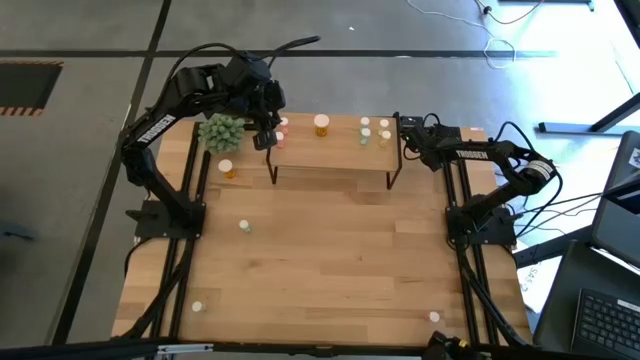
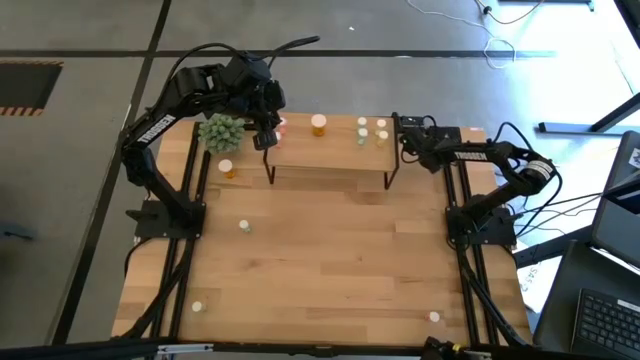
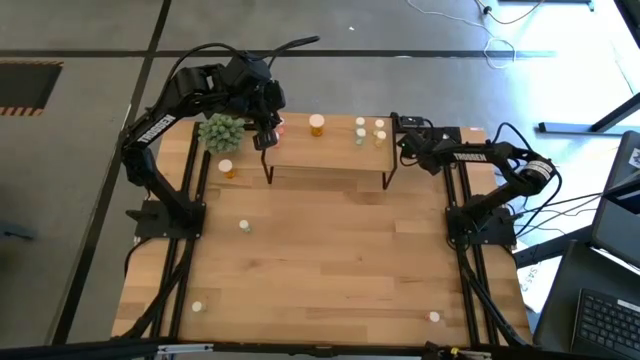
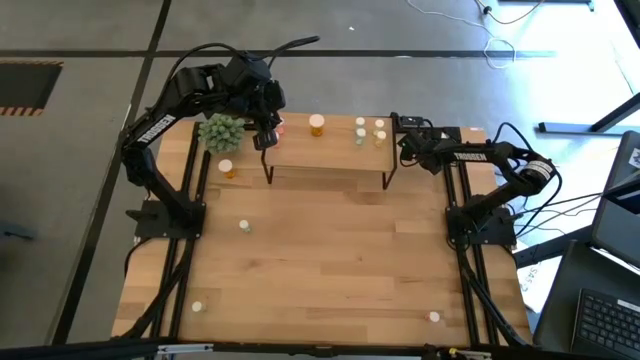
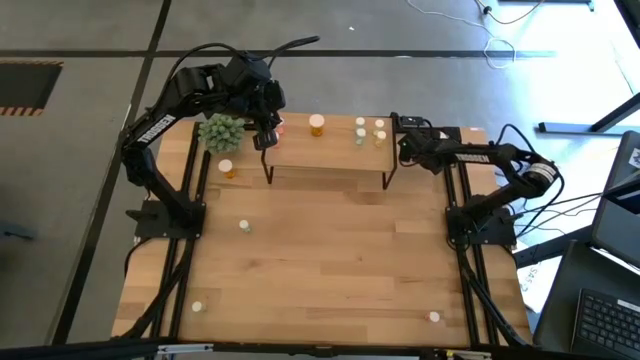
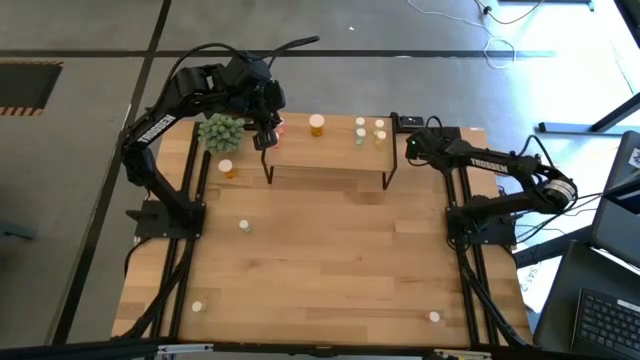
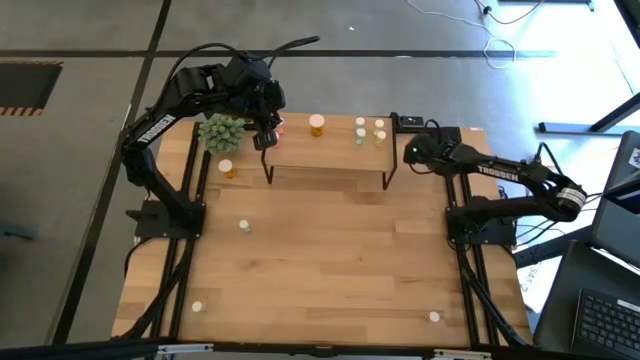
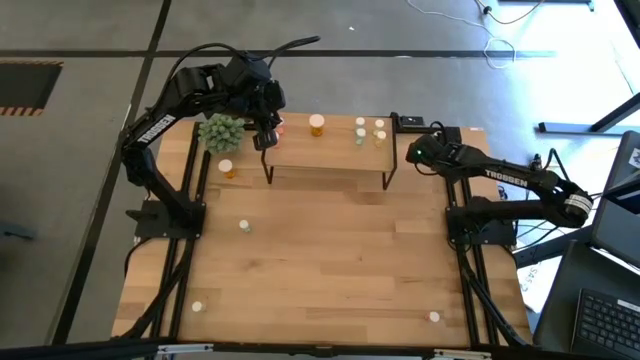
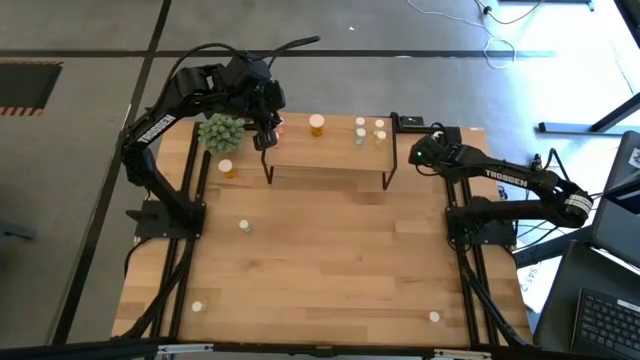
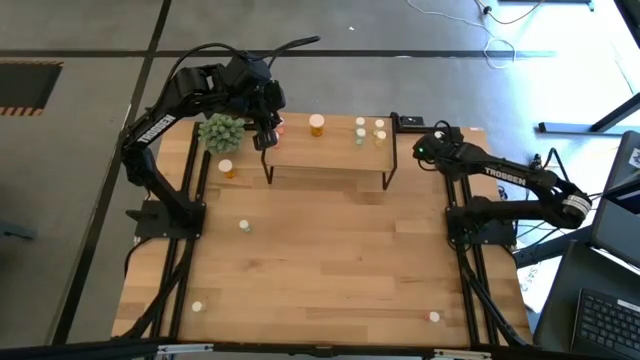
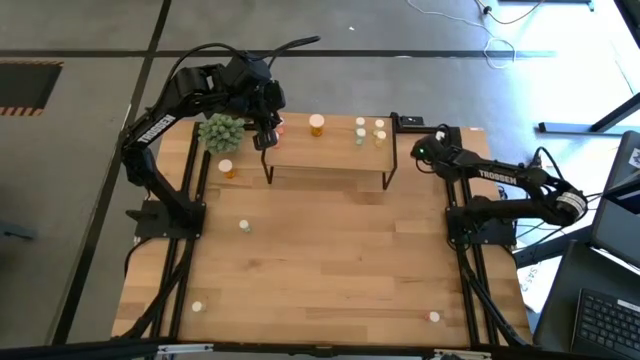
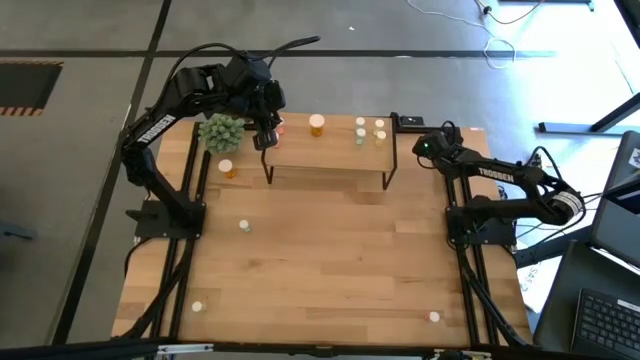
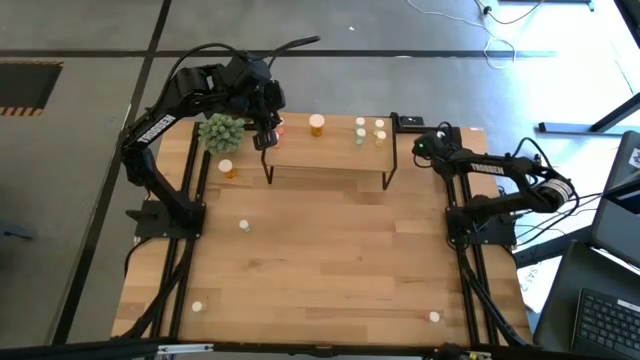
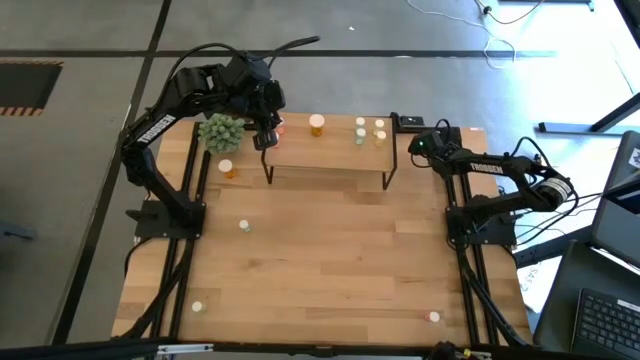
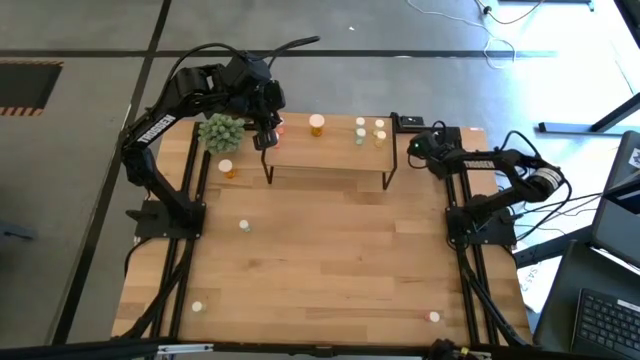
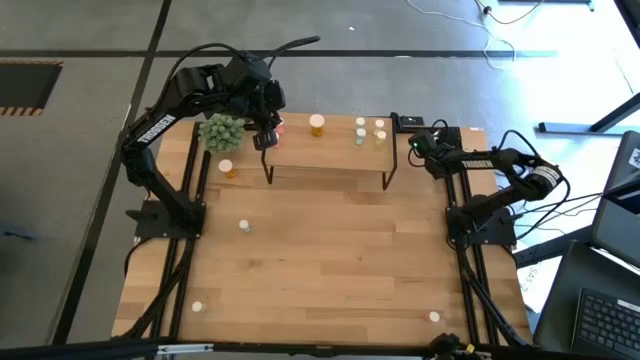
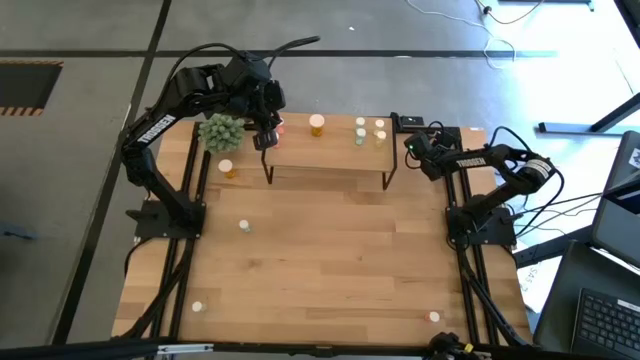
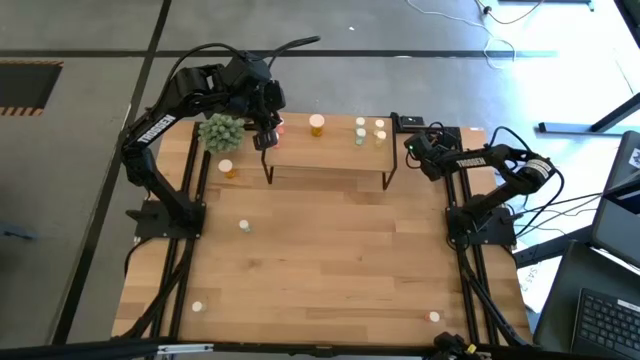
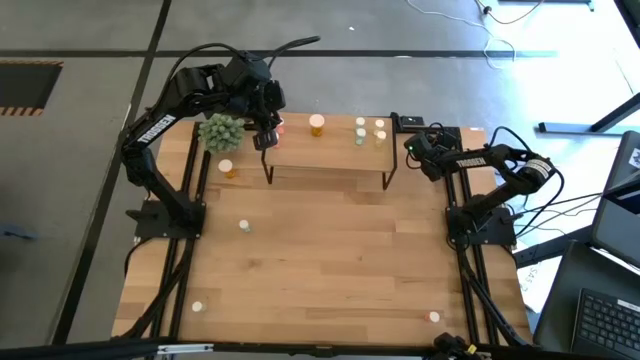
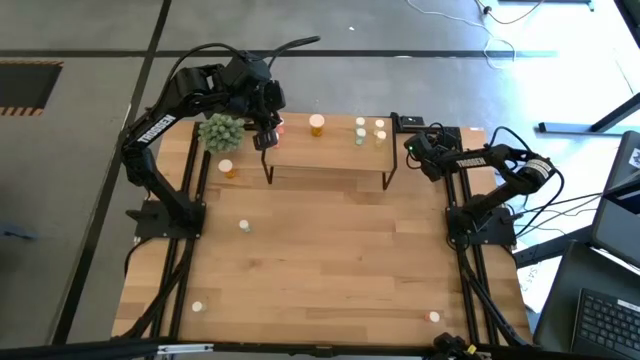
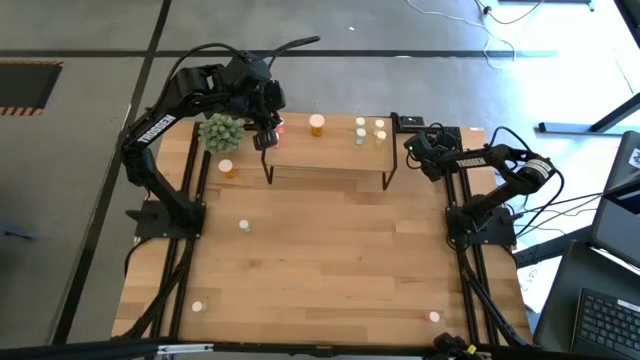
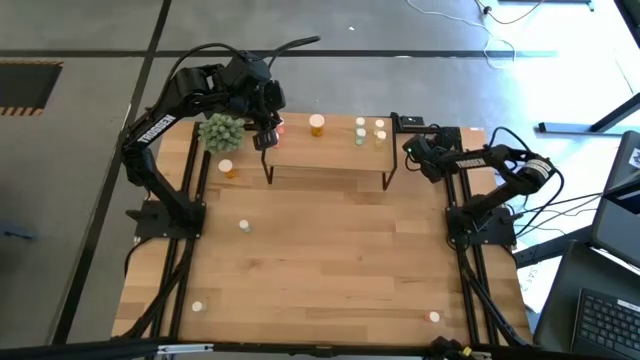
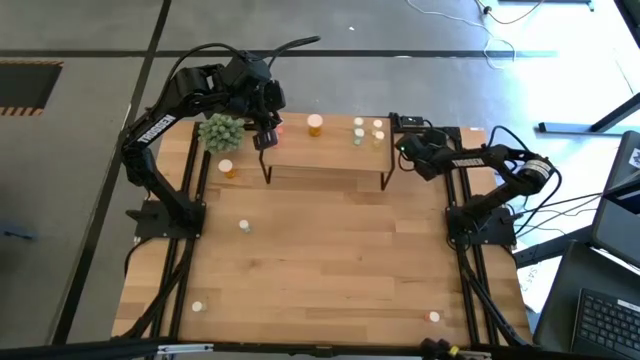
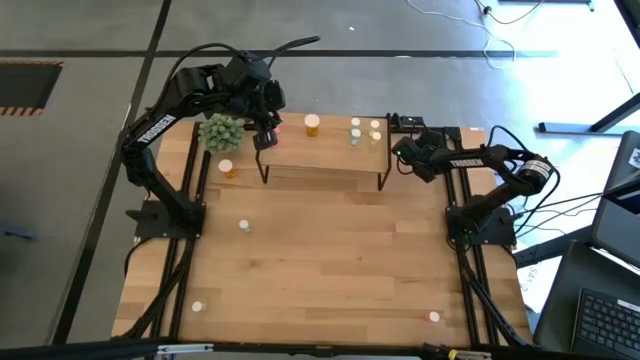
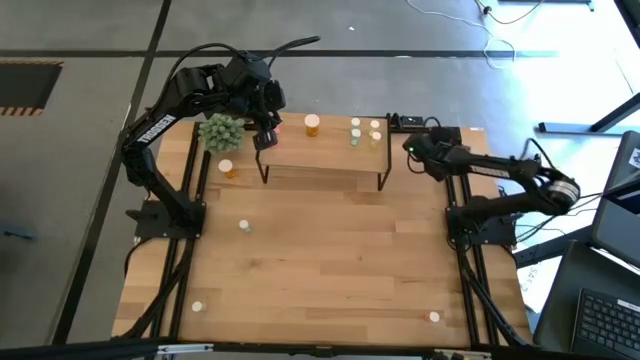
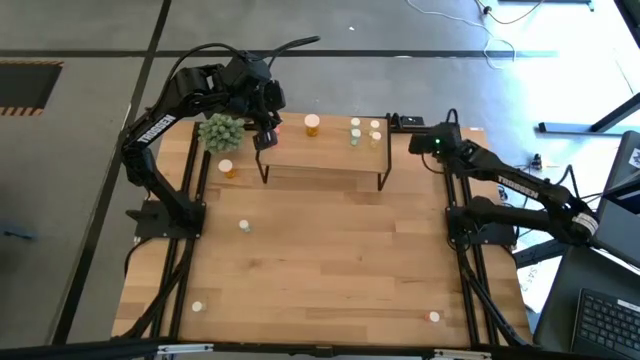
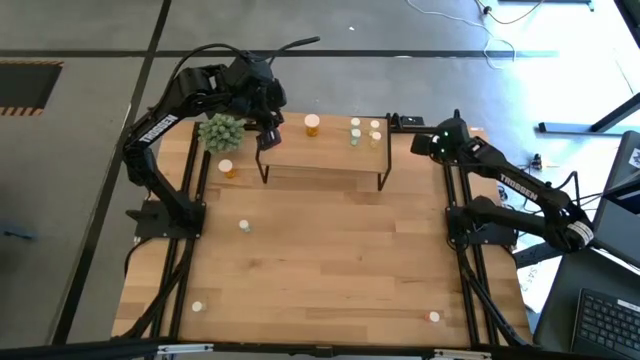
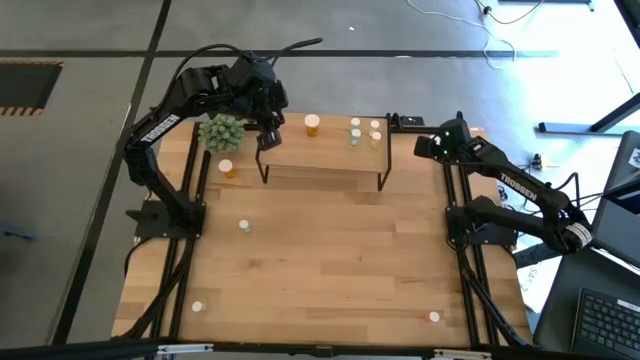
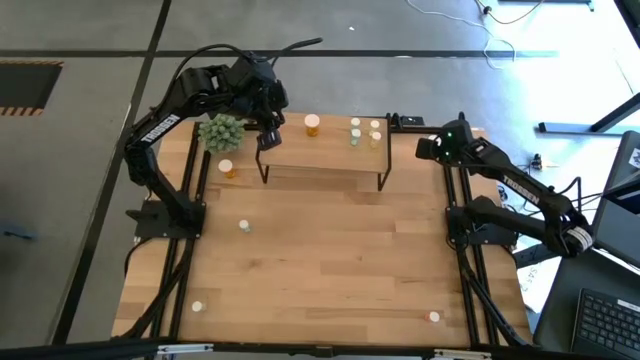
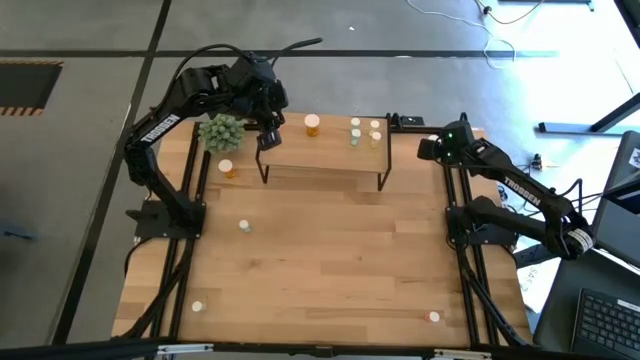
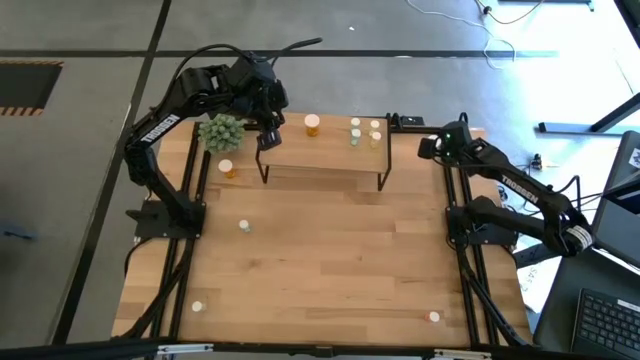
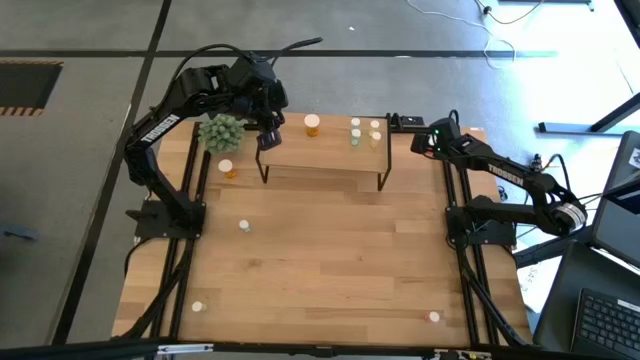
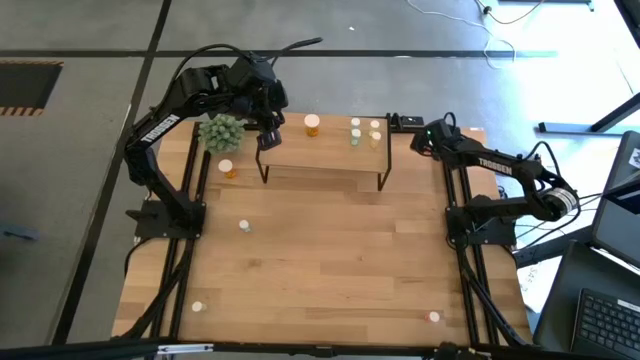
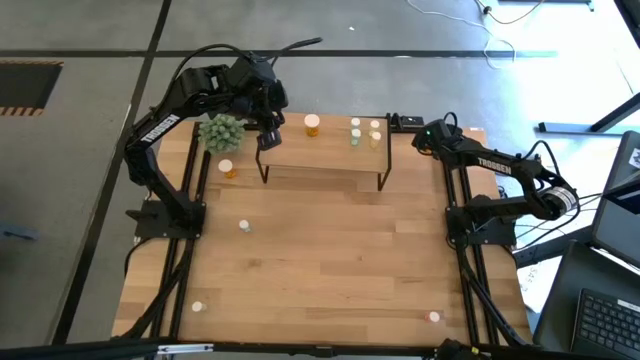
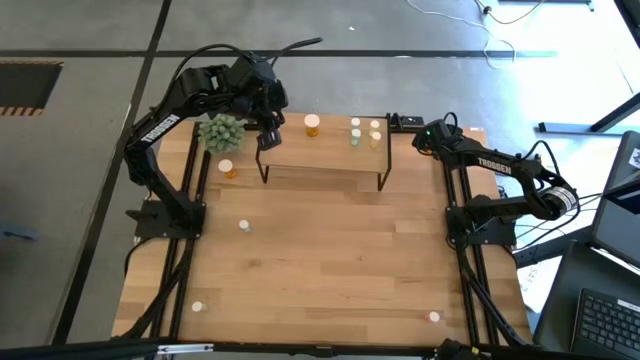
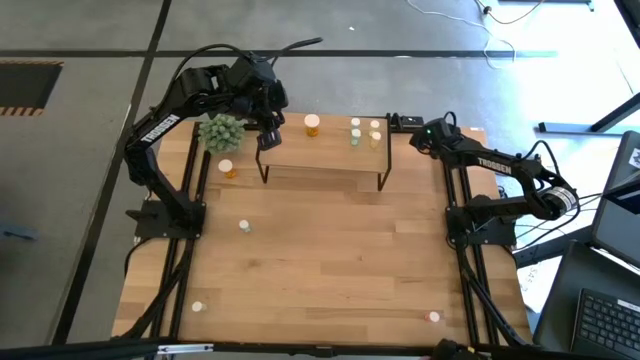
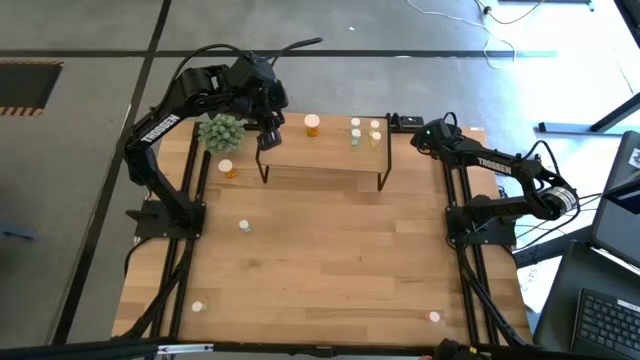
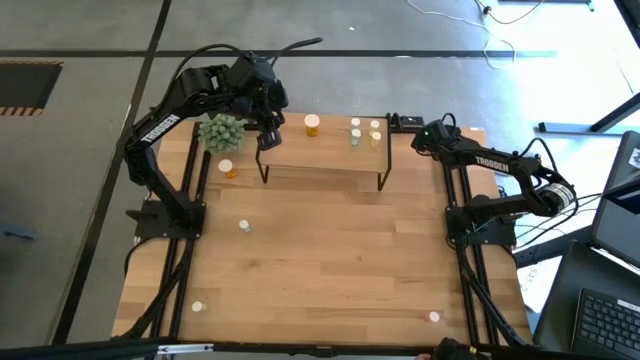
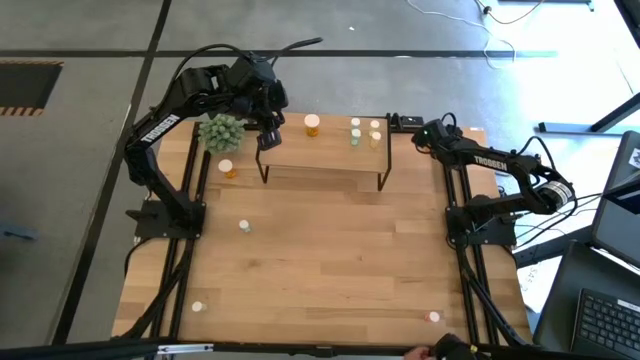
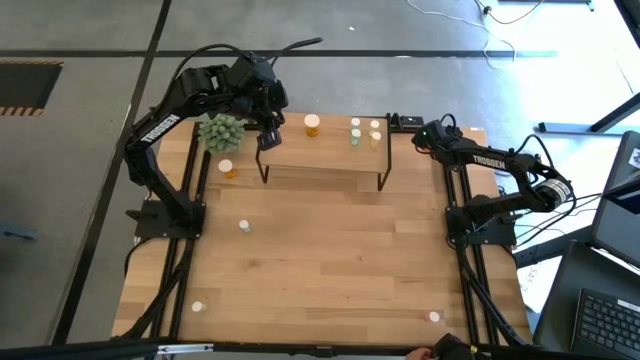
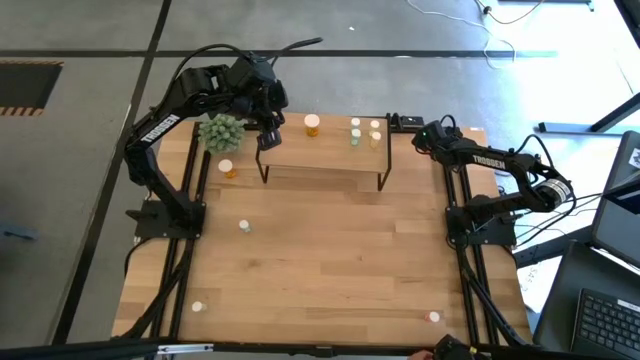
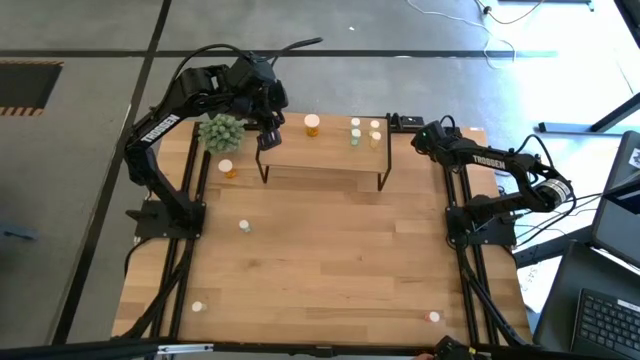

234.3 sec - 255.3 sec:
Task: Pick and place medicine bottles onto shelf by color
Put the right orange medicine bottle on the shelf, aligned with the other orange medicine bottle
